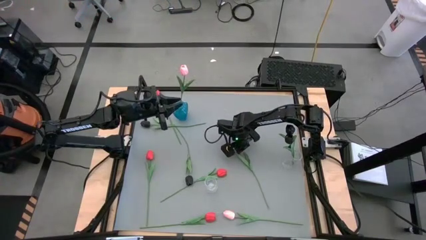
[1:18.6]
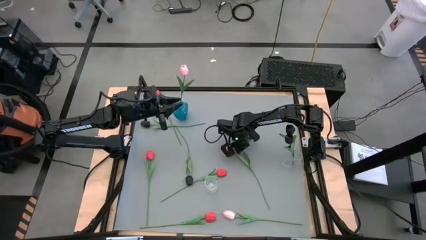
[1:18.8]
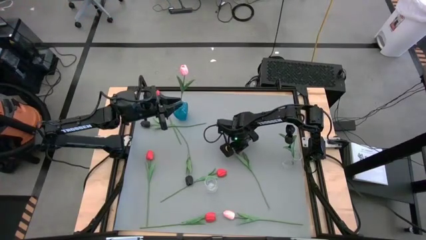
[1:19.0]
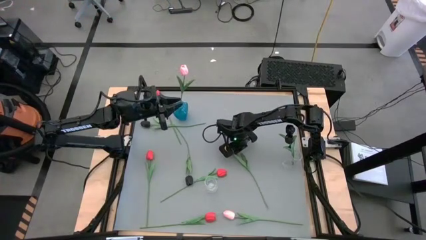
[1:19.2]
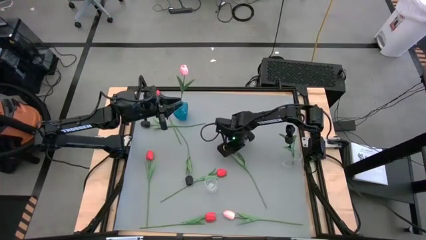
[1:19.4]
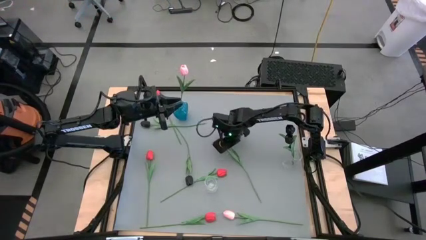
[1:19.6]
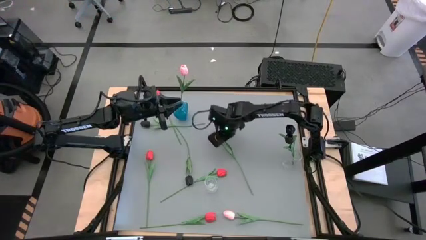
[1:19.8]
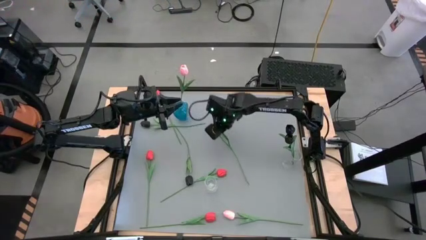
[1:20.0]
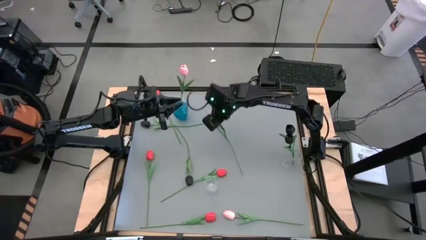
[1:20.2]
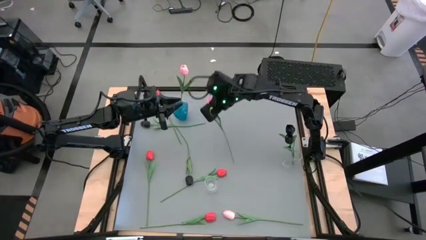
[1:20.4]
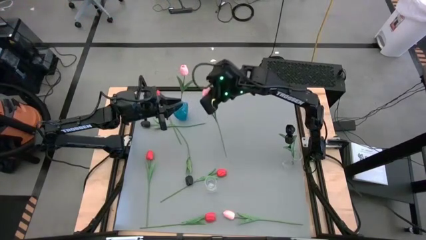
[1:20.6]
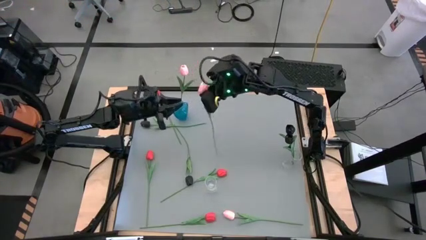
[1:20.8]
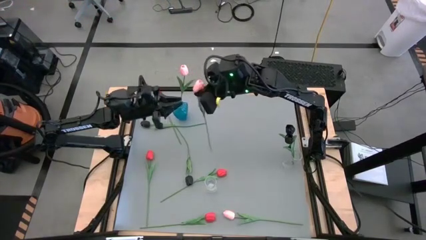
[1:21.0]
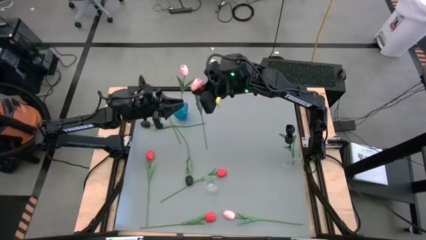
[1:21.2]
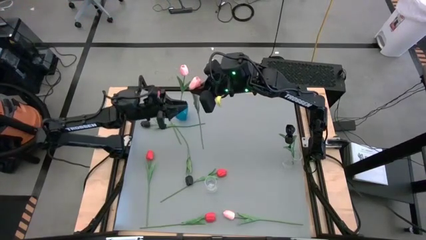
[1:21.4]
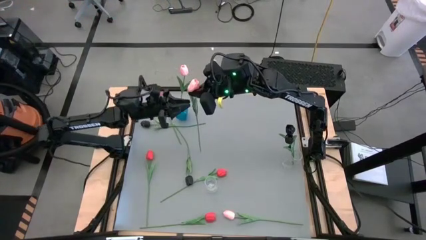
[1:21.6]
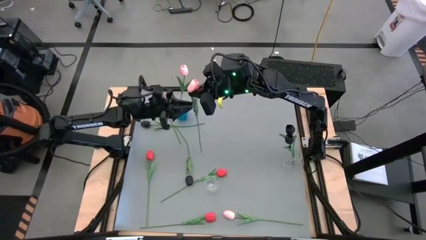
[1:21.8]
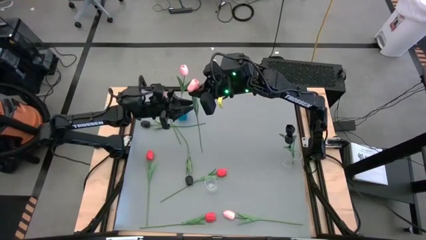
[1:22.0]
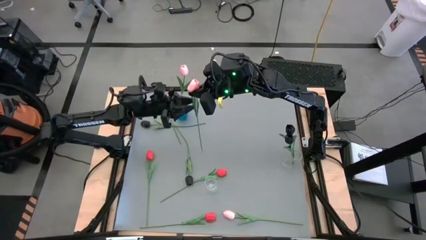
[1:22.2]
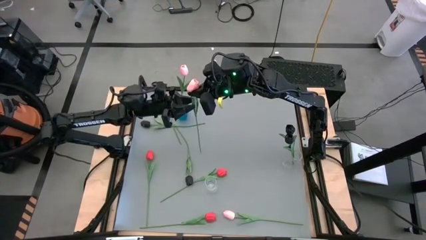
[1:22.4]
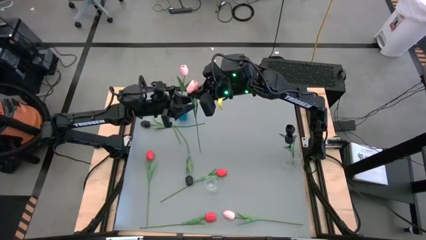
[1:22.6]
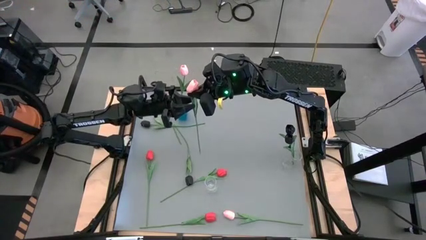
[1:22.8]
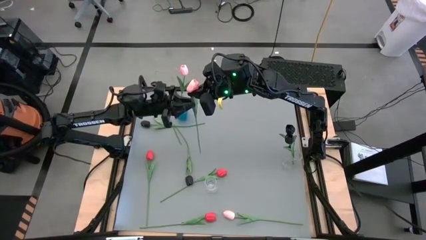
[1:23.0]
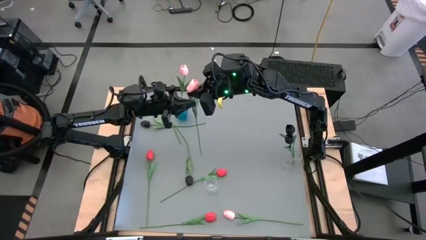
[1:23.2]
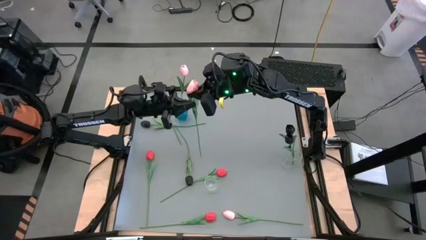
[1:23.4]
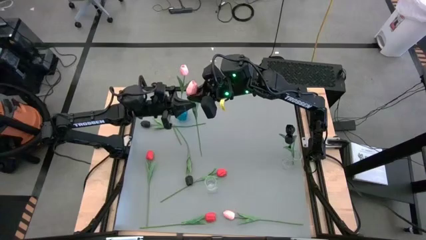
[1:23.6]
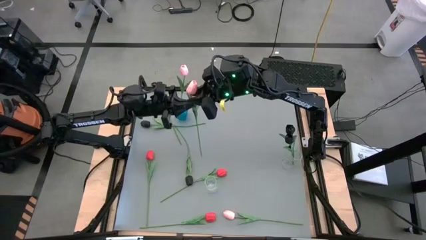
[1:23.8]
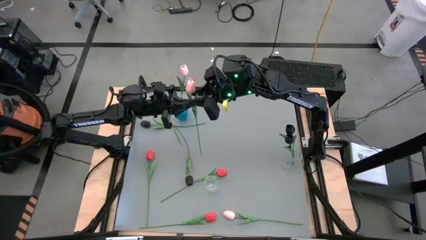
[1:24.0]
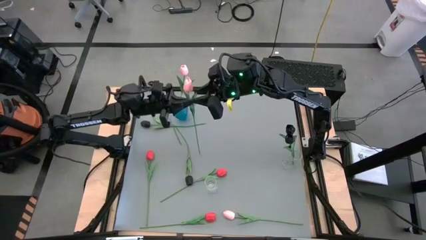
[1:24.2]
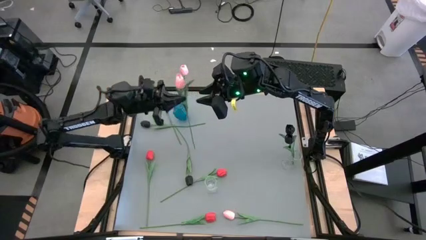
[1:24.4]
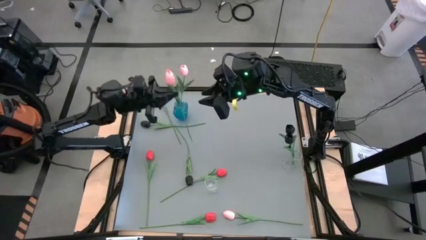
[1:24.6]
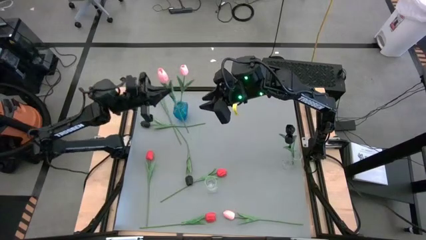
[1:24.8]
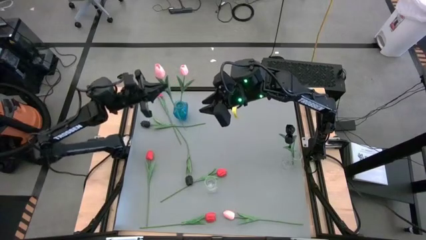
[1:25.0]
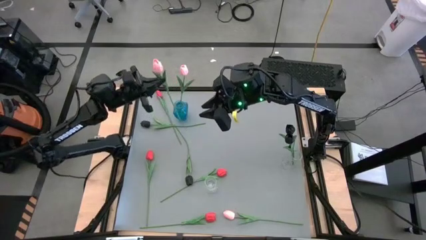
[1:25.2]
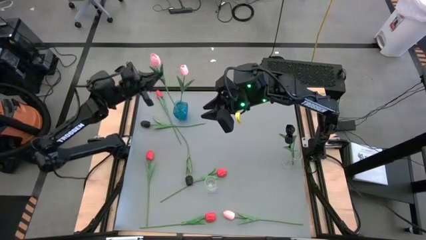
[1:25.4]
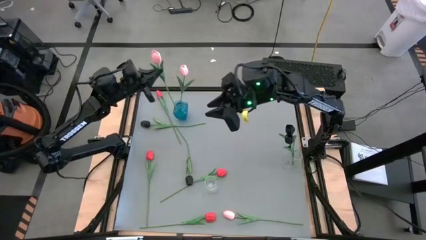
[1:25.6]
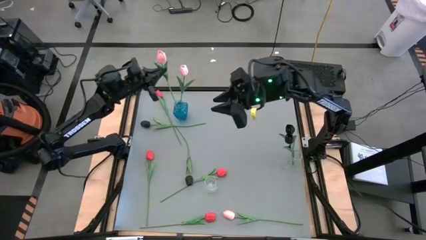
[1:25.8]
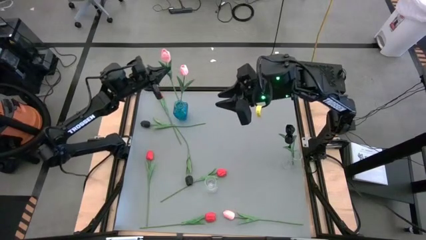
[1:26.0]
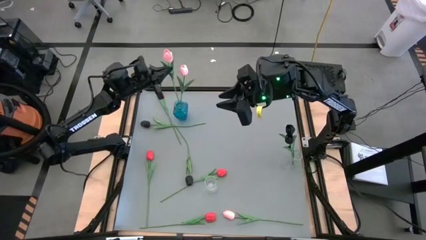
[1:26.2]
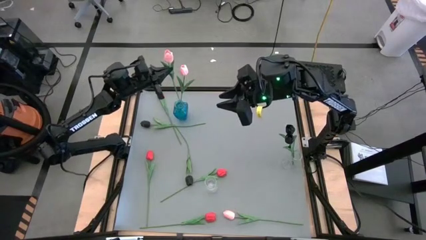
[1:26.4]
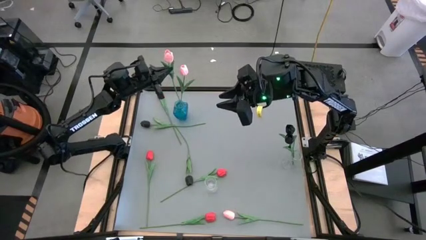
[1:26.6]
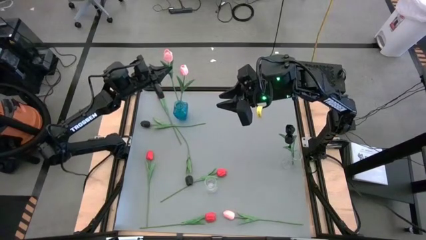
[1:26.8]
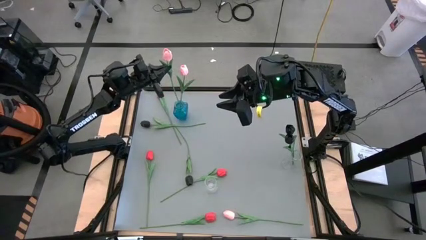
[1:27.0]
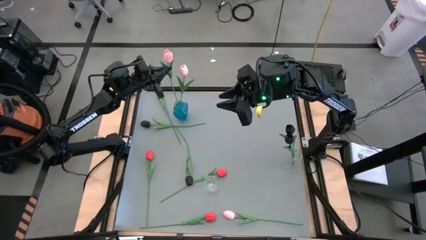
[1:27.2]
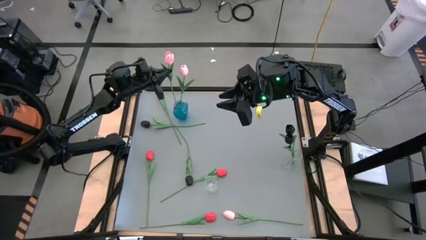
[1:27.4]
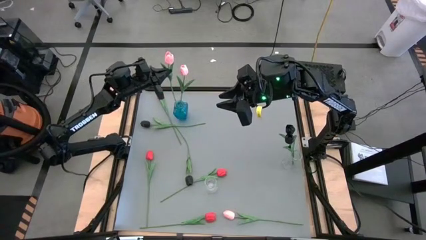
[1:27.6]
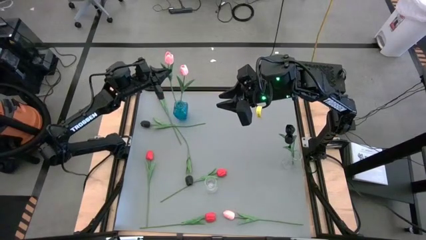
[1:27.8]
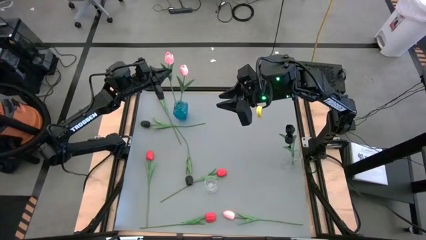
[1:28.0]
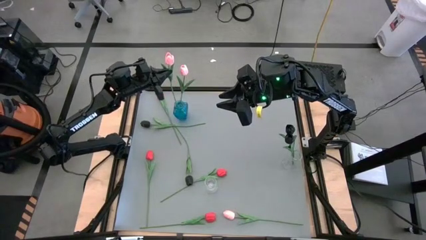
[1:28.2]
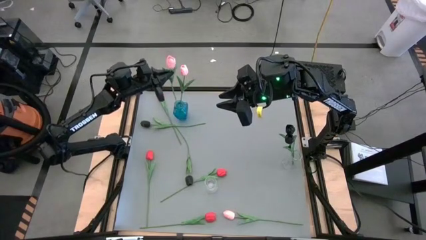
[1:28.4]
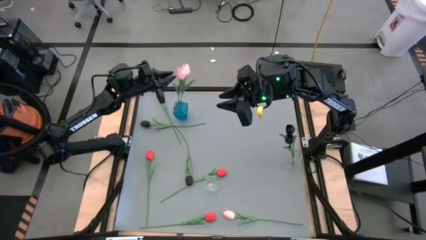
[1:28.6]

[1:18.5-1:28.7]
Task: Sort flowers into vase by color
Put pink flower into the blue vase
